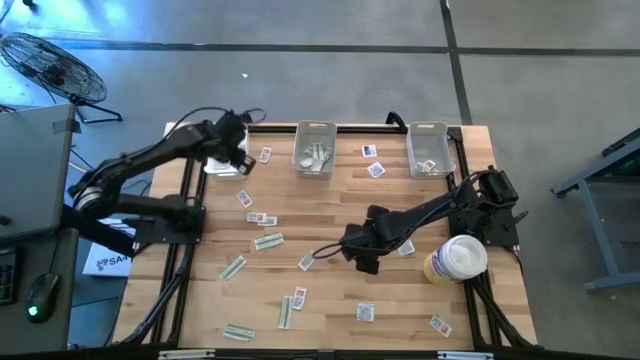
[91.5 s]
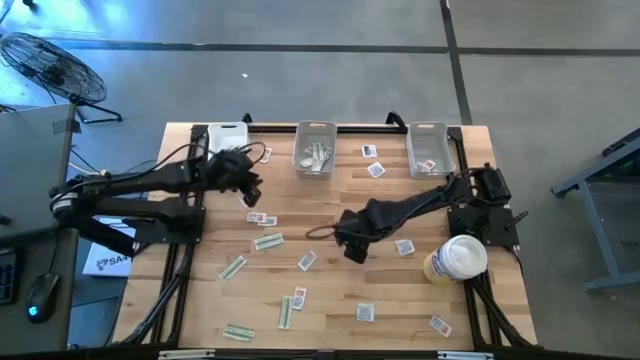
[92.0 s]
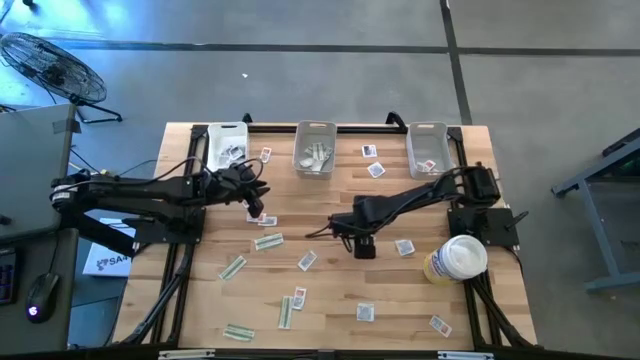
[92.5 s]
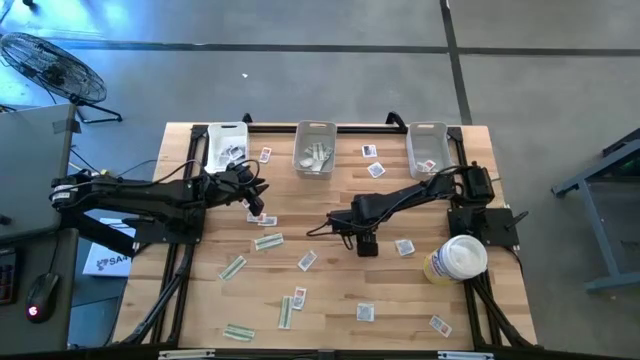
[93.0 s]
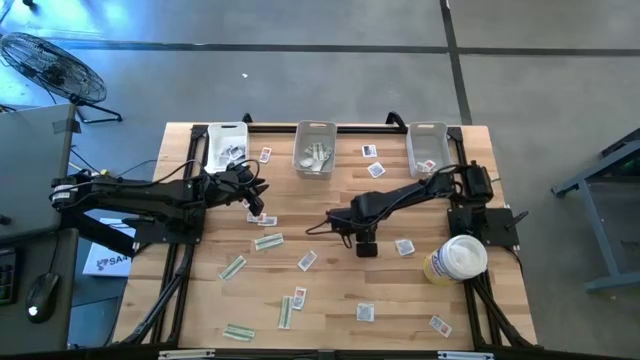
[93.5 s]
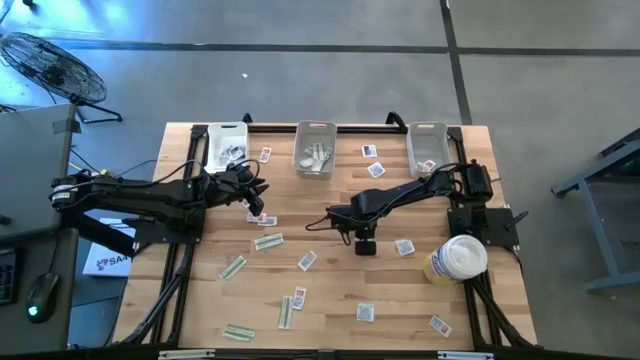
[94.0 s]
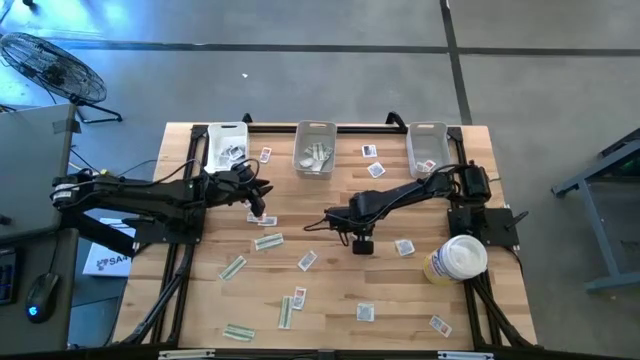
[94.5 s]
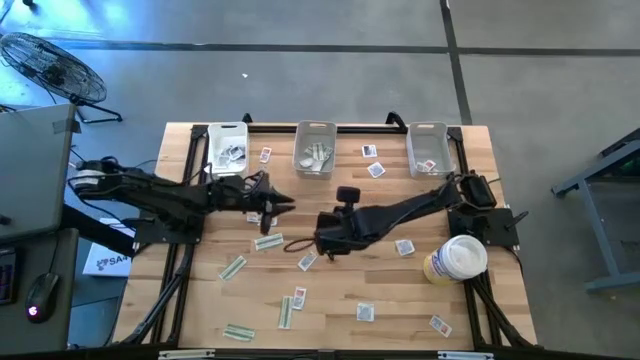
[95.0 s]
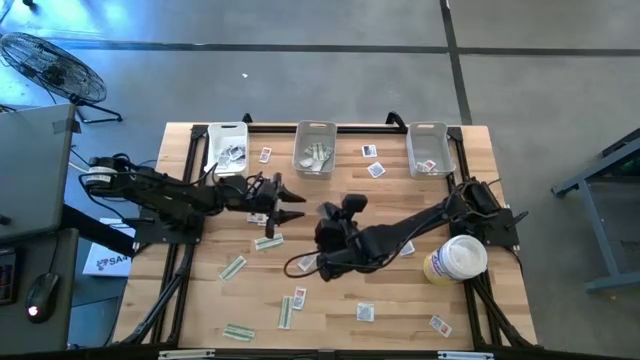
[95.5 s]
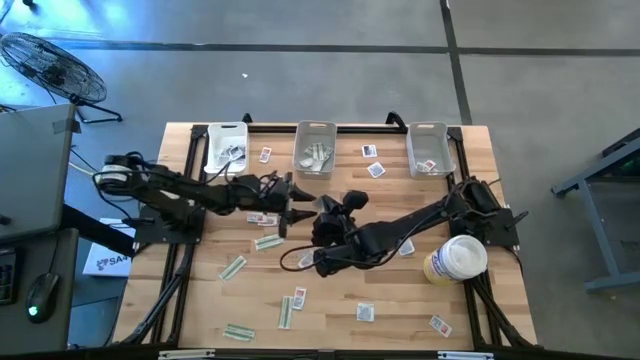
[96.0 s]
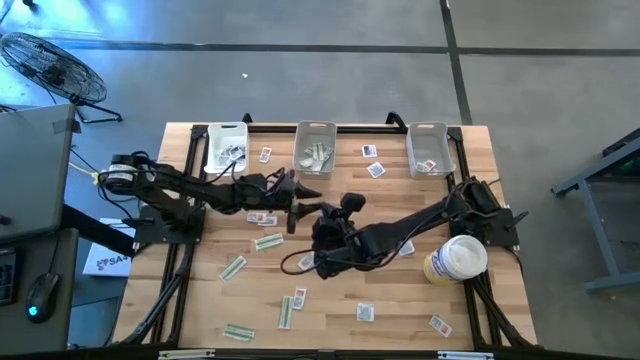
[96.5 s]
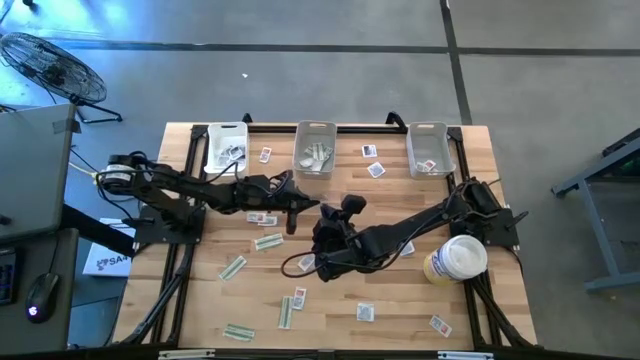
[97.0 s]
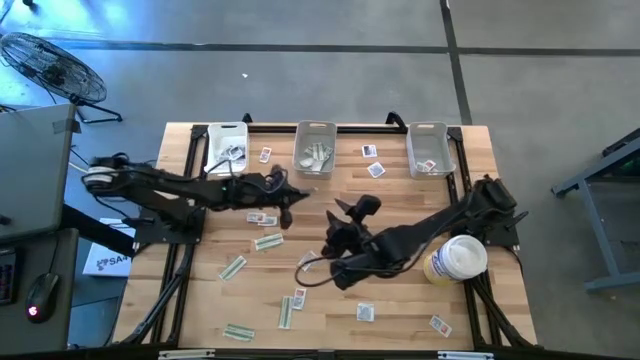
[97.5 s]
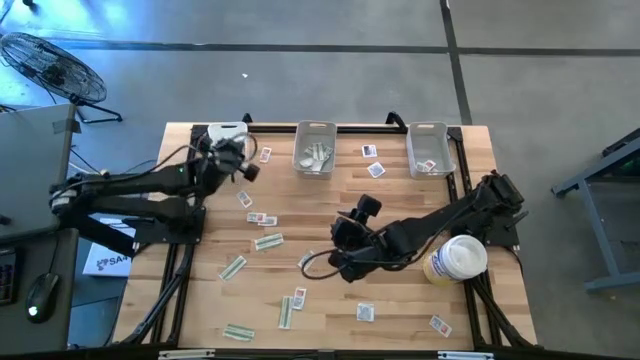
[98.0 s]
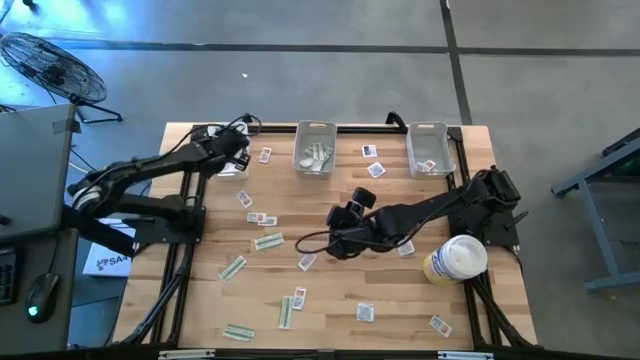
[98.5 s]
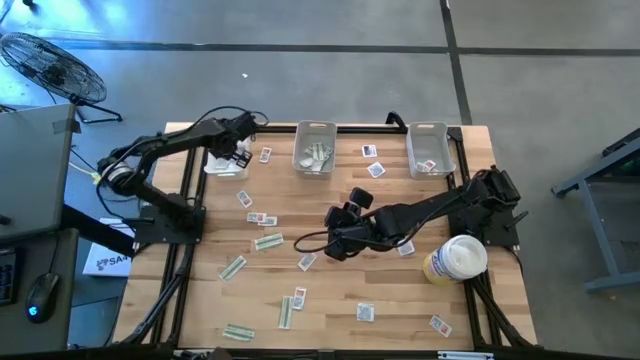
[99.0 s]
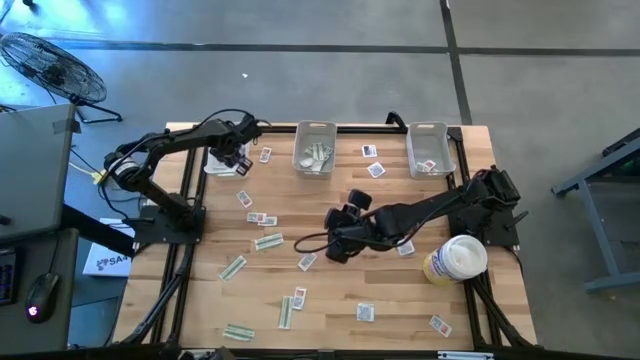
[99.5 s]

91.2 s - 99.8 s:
Task: Pick & Place First Aid Supplies
Put the blue pad into the white bin

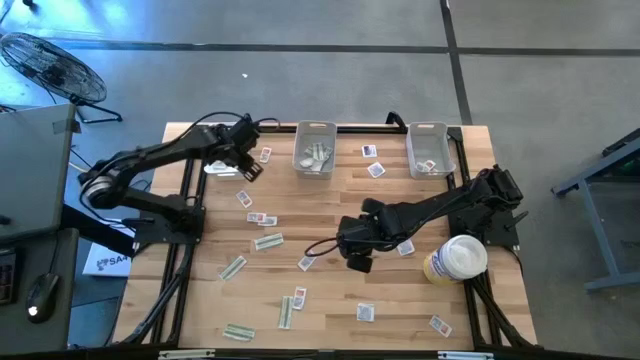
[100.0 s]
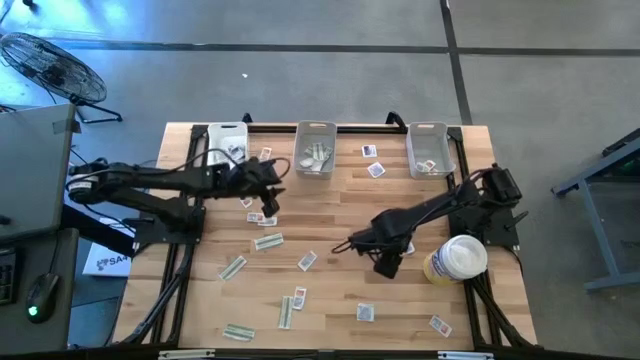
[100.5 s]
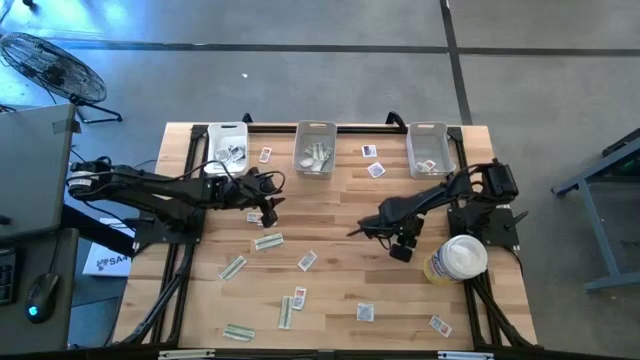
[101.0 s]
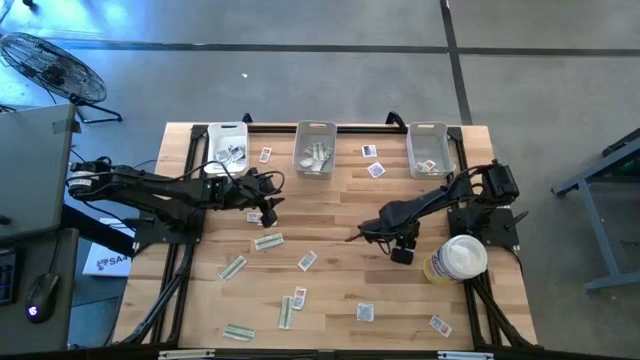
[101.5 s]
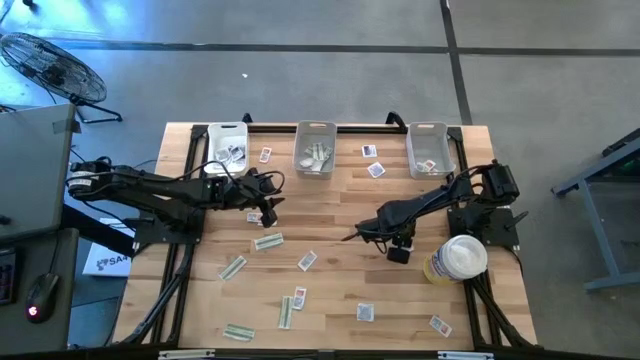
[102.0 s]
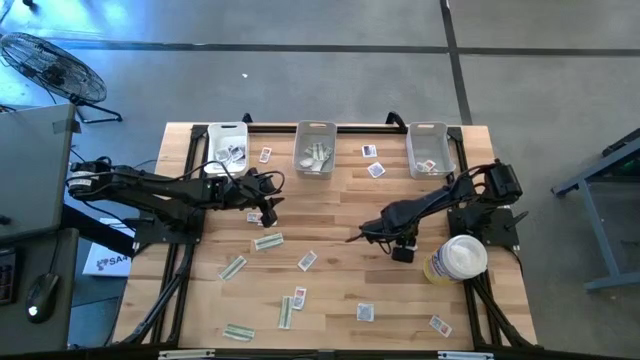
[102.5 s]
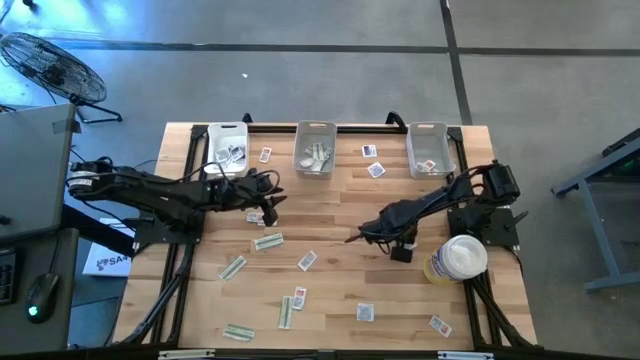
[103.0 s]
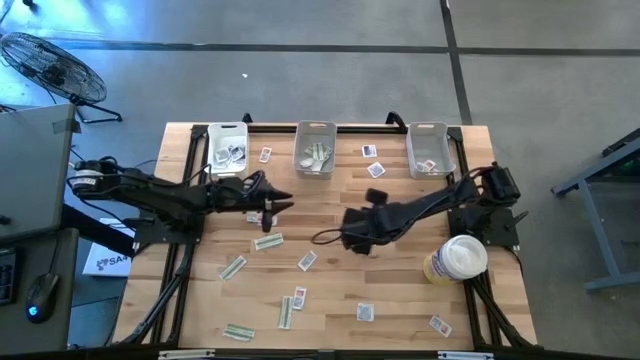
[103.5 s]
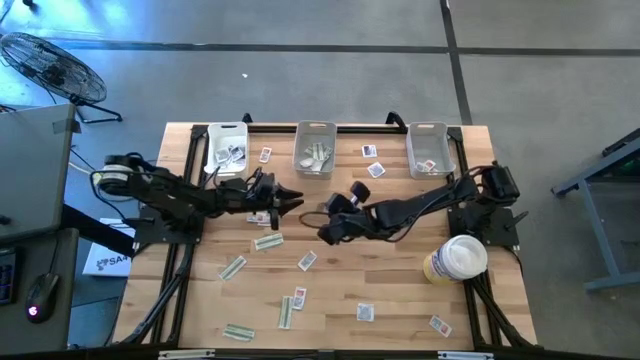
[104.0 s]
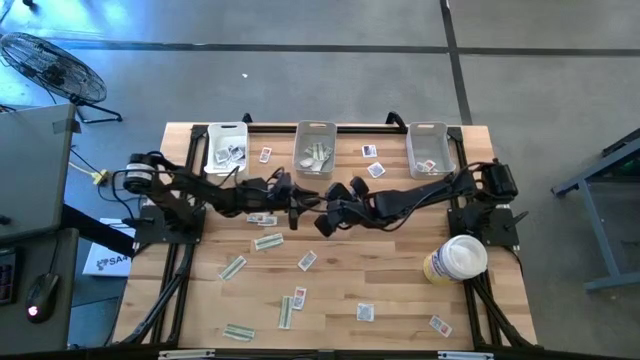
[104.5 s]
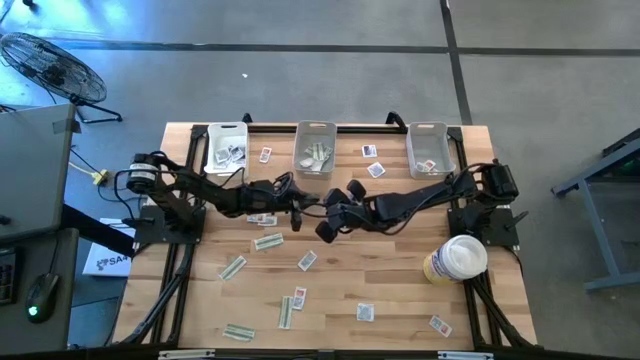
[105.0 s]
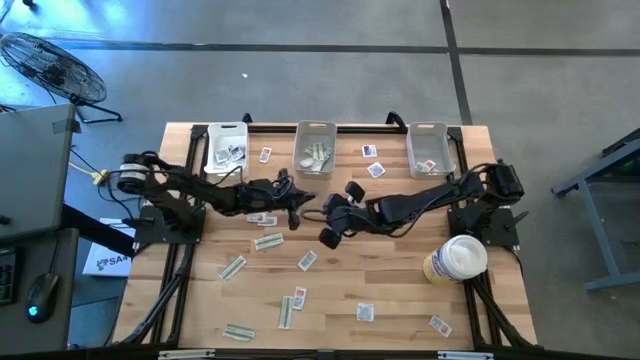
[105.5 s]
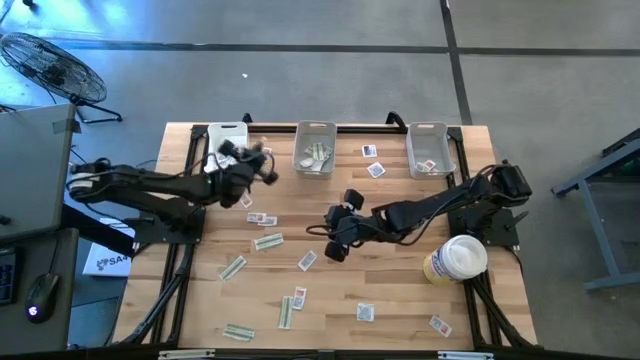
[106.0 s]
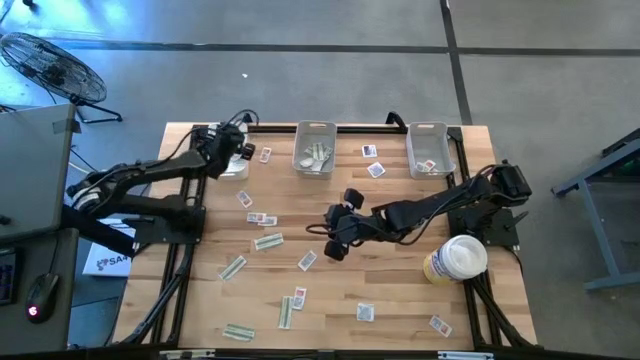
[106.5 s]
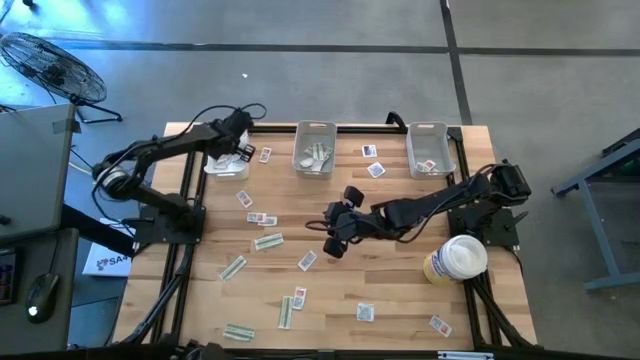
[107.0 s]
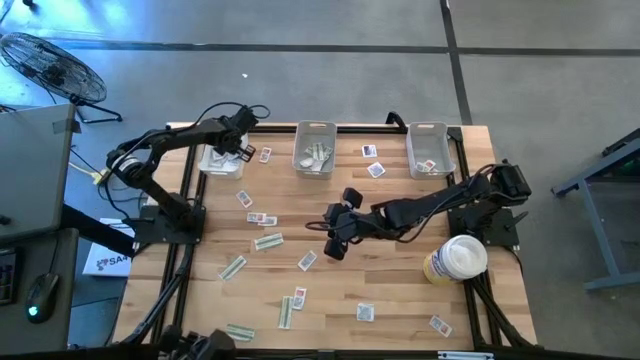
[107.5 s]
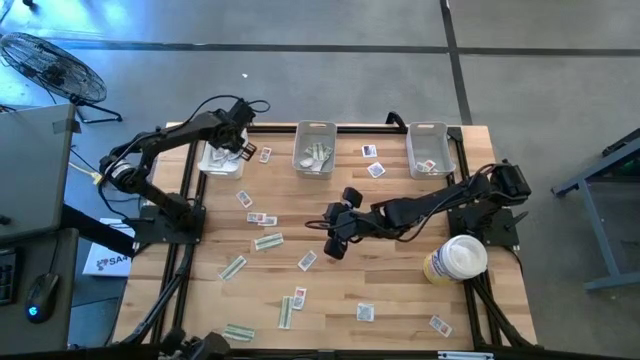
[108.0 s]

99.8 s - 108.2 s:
Put the blue pad into the white bin

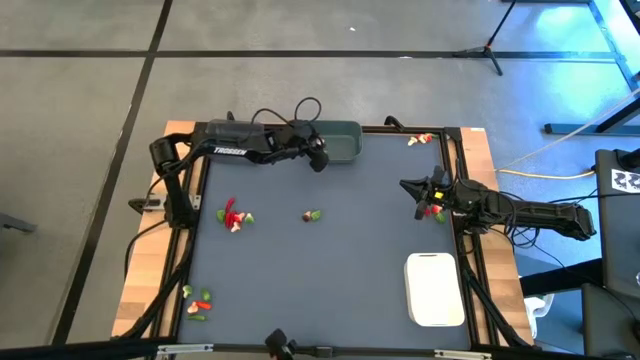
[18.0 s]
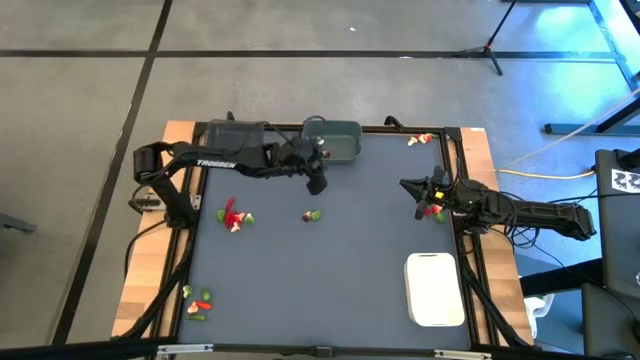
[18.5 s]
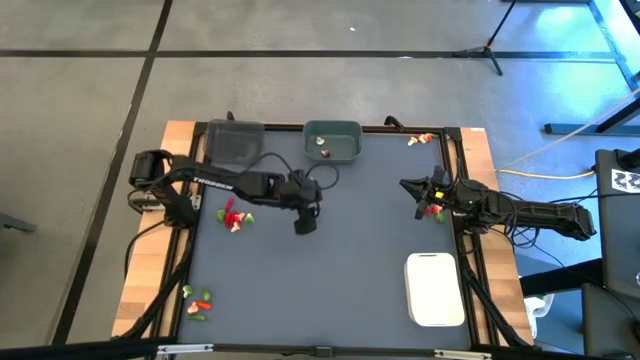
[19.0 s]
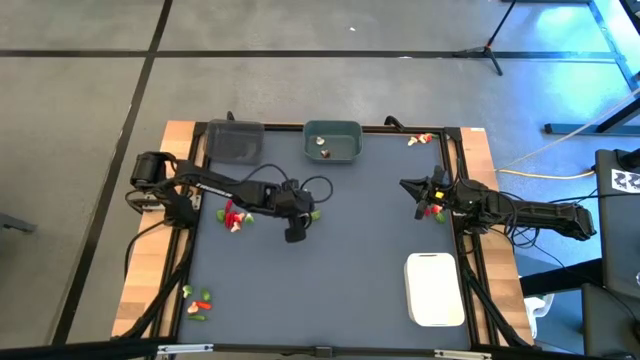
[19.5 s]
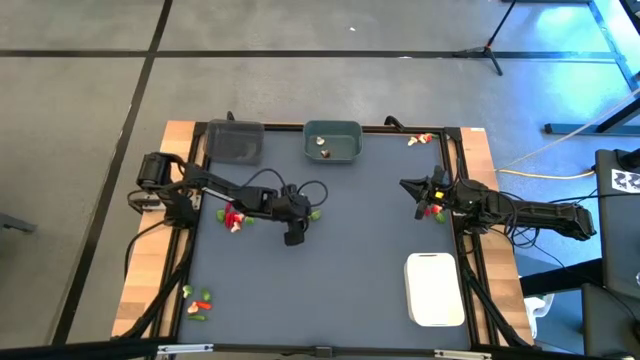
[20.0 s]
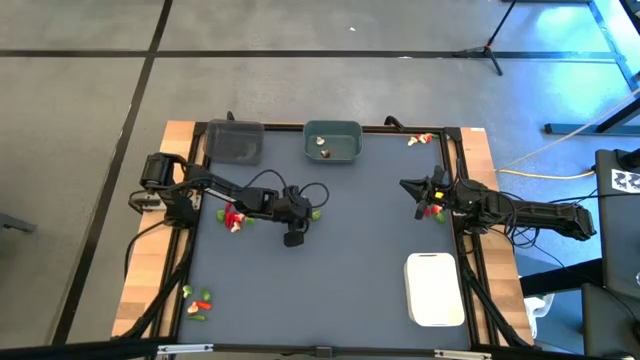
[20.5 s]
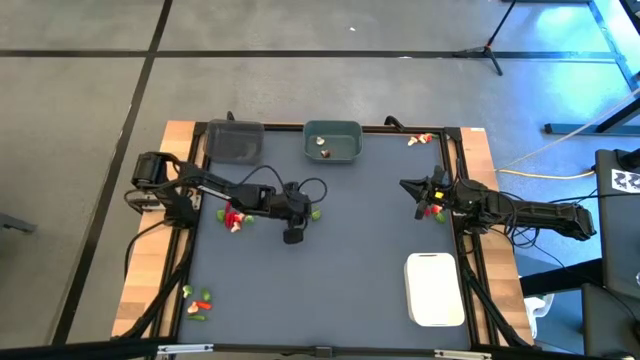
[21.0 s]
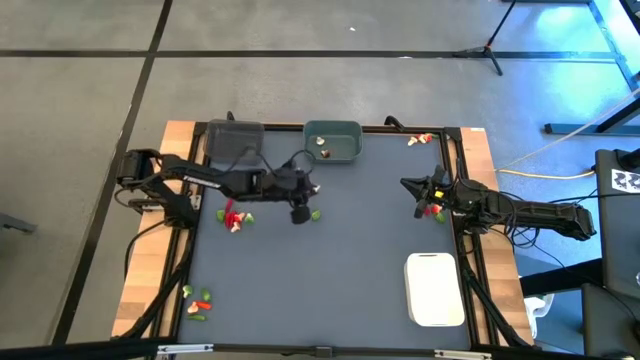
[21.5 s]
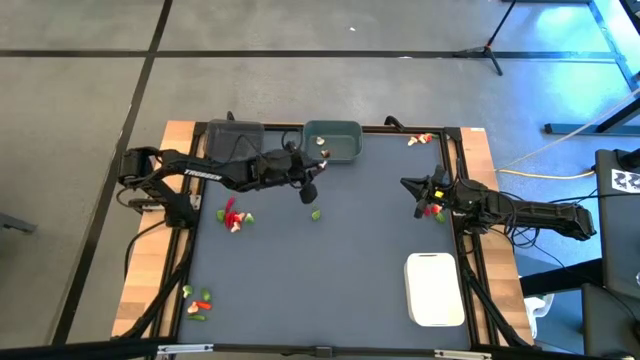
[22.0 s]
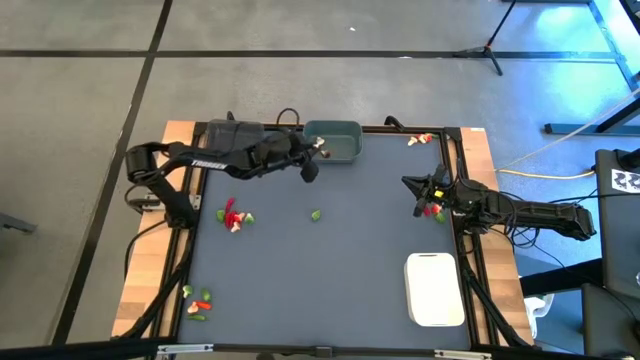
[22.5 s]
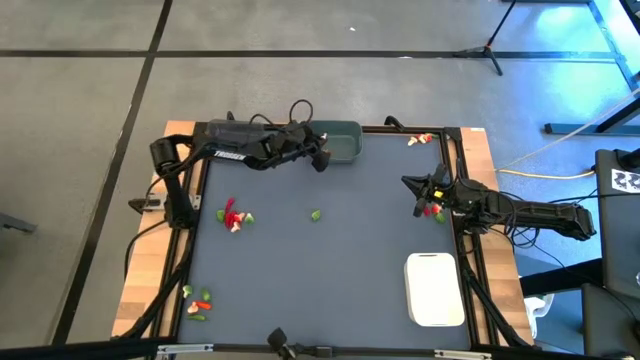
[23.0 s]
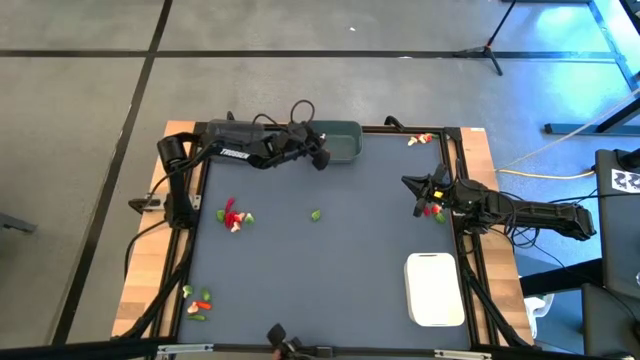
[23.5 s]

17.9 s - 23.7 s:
Task: Sort produce into baskets
Put the brown mushroom into the blue bin
